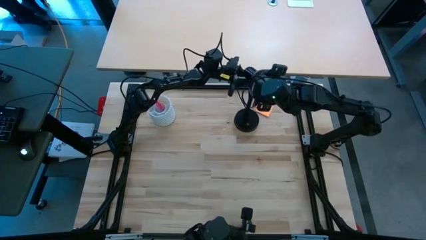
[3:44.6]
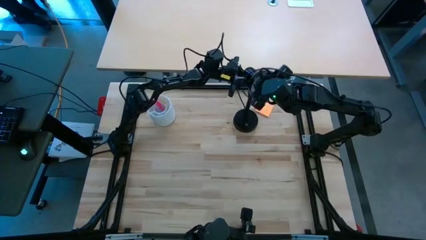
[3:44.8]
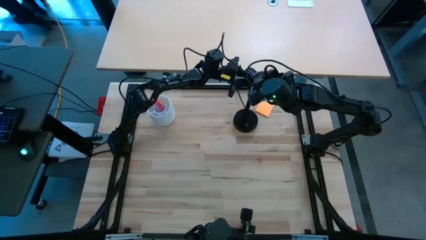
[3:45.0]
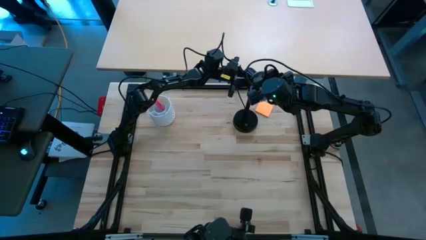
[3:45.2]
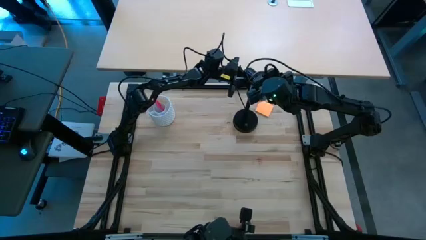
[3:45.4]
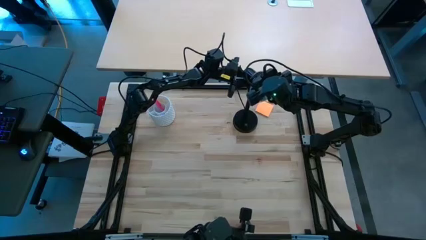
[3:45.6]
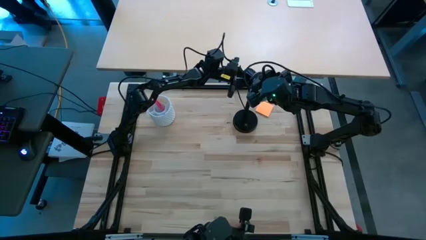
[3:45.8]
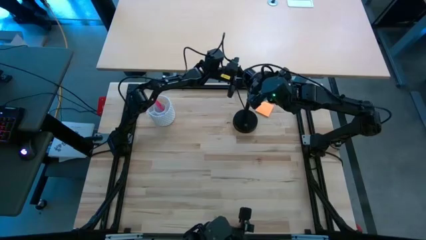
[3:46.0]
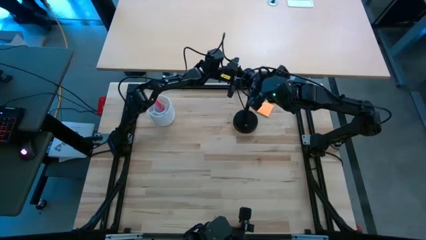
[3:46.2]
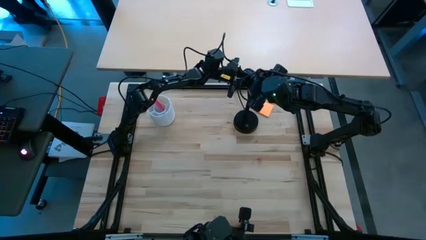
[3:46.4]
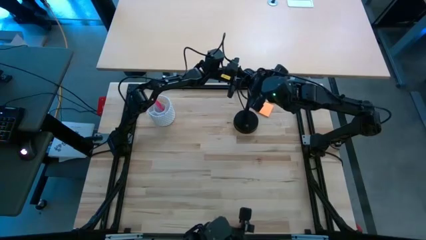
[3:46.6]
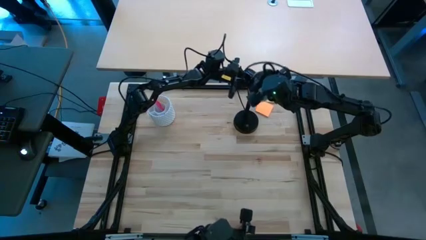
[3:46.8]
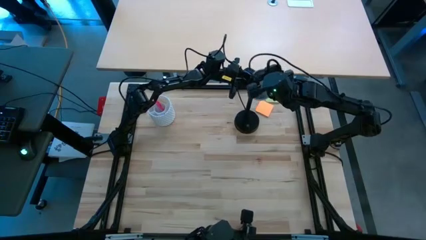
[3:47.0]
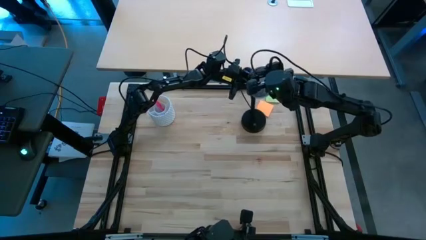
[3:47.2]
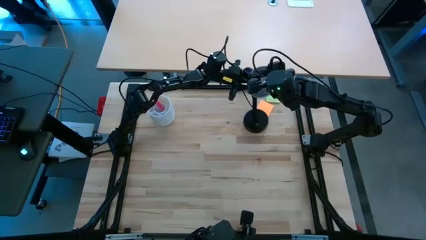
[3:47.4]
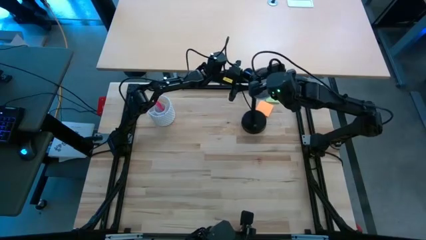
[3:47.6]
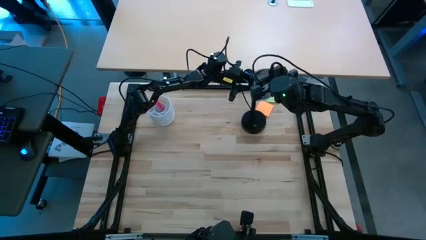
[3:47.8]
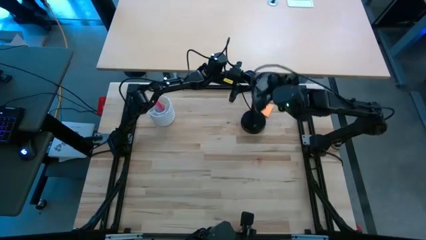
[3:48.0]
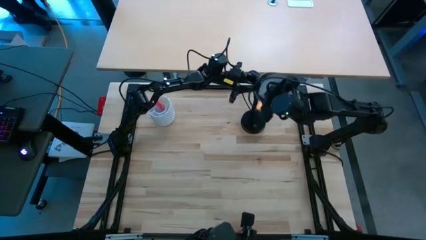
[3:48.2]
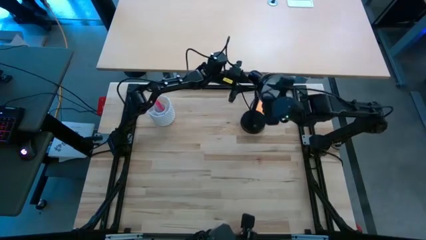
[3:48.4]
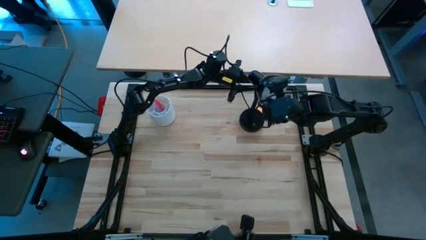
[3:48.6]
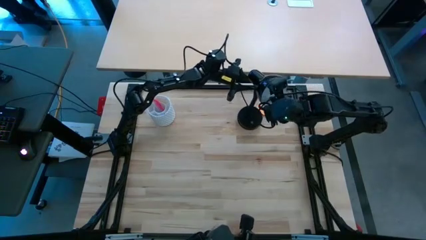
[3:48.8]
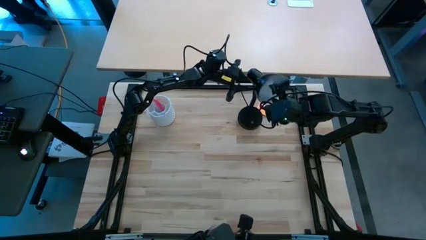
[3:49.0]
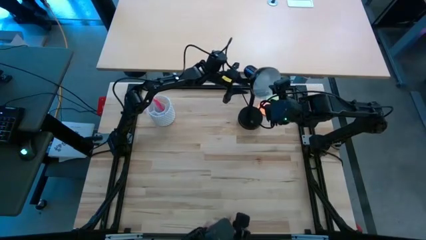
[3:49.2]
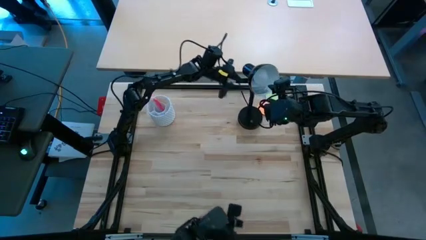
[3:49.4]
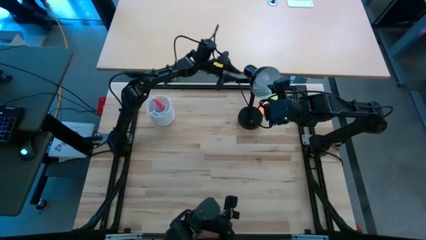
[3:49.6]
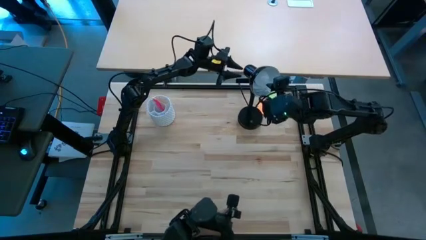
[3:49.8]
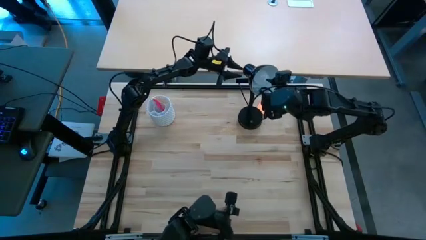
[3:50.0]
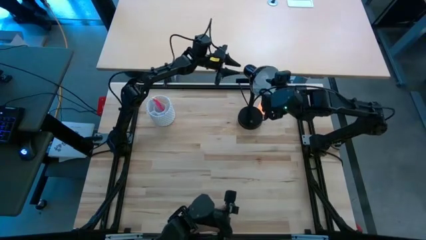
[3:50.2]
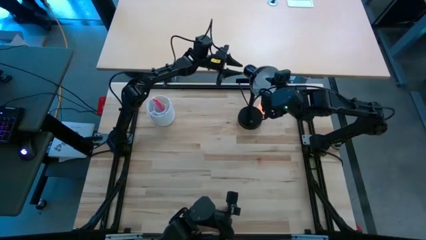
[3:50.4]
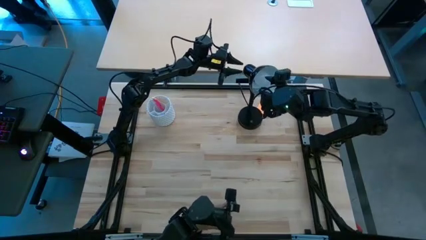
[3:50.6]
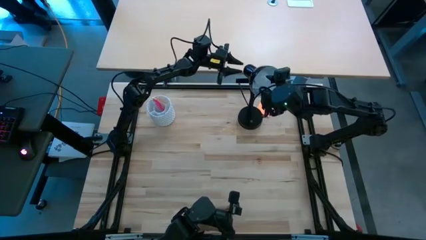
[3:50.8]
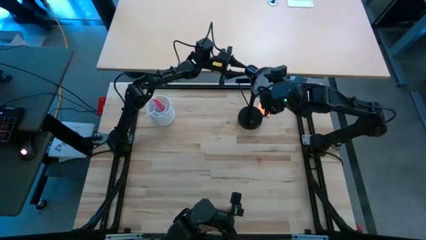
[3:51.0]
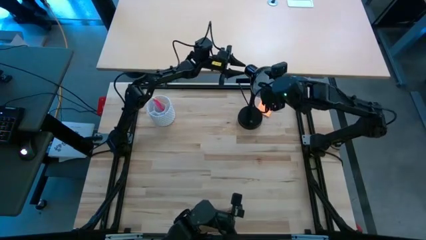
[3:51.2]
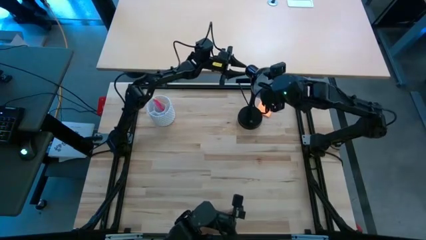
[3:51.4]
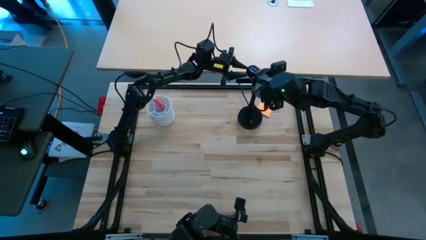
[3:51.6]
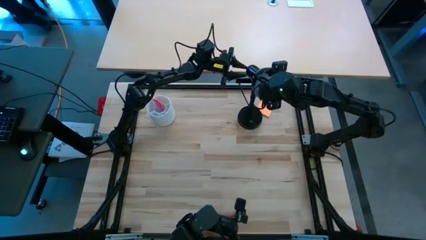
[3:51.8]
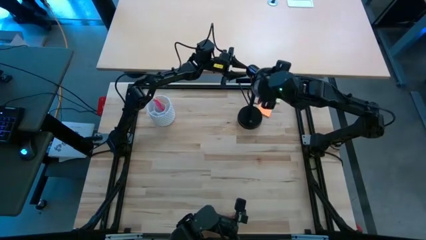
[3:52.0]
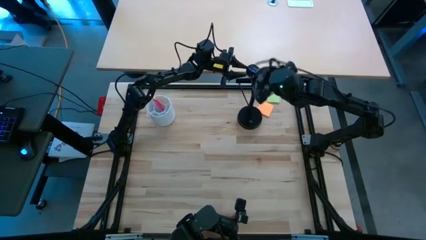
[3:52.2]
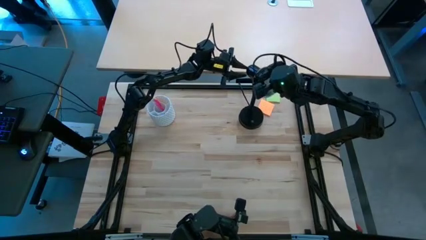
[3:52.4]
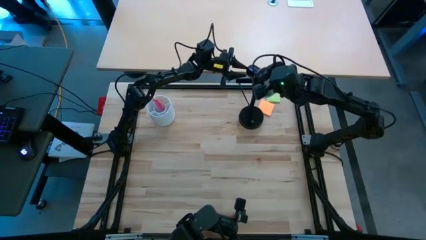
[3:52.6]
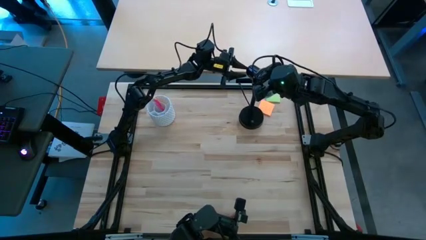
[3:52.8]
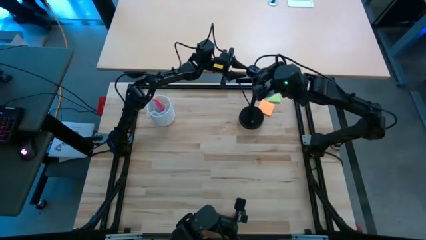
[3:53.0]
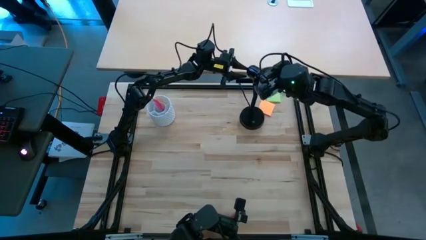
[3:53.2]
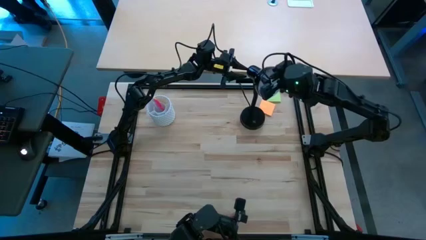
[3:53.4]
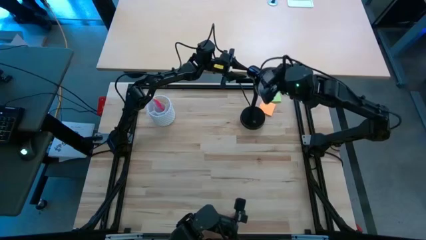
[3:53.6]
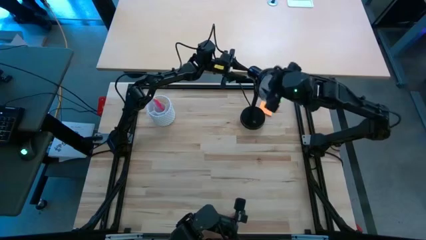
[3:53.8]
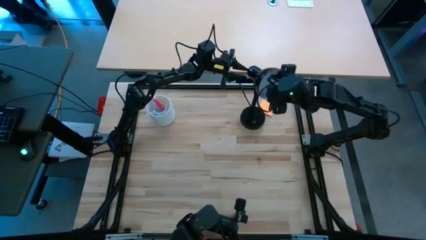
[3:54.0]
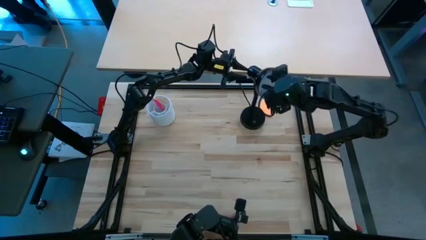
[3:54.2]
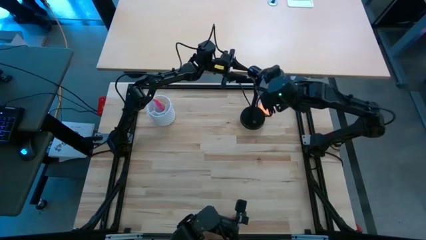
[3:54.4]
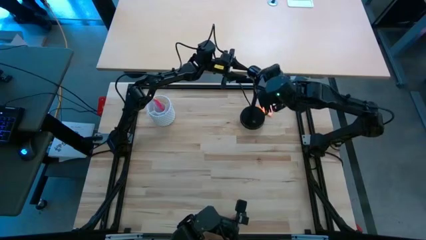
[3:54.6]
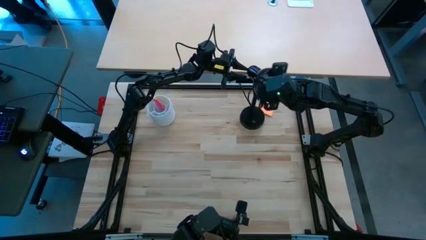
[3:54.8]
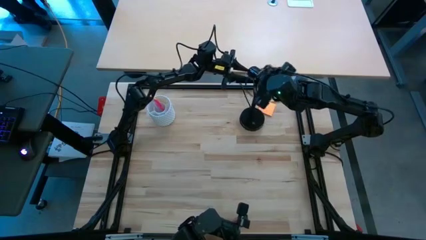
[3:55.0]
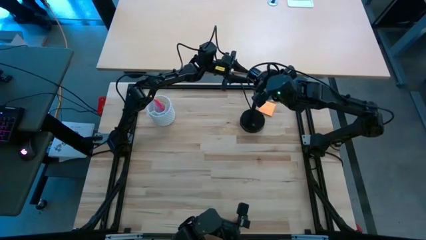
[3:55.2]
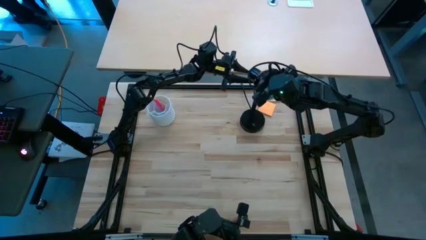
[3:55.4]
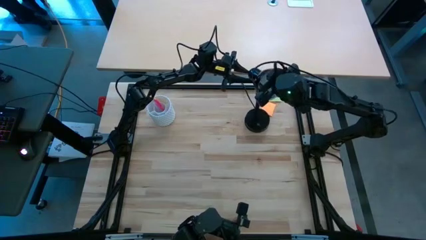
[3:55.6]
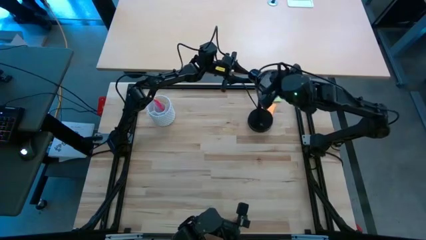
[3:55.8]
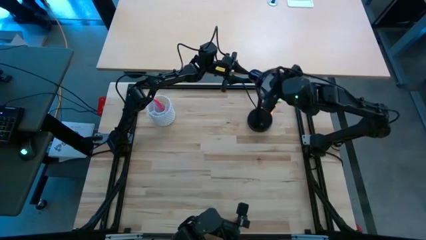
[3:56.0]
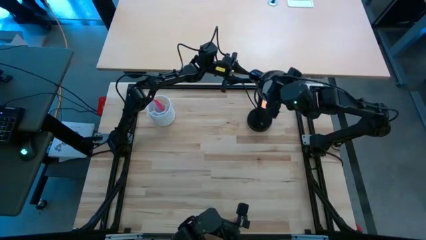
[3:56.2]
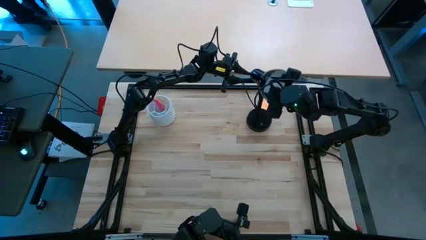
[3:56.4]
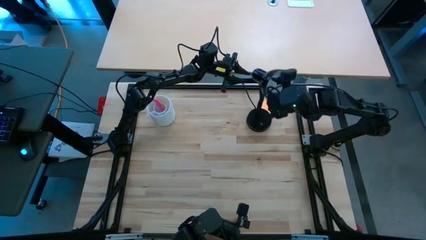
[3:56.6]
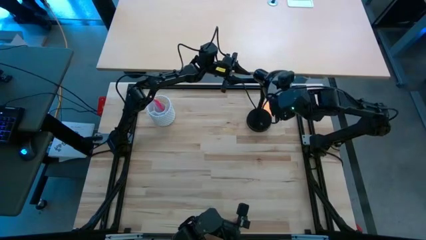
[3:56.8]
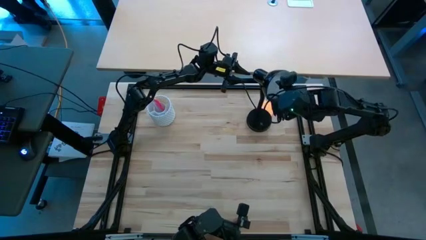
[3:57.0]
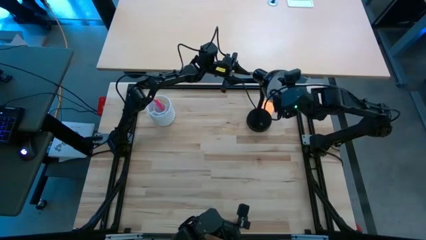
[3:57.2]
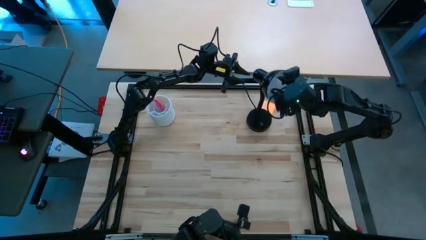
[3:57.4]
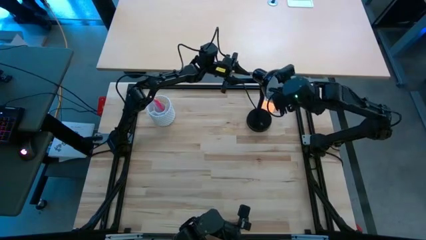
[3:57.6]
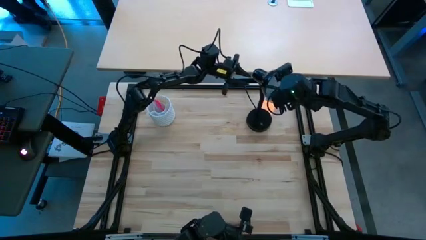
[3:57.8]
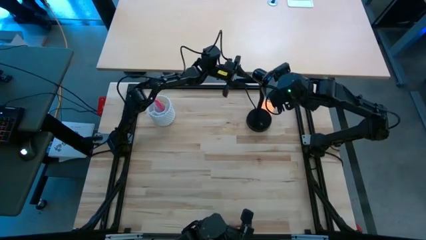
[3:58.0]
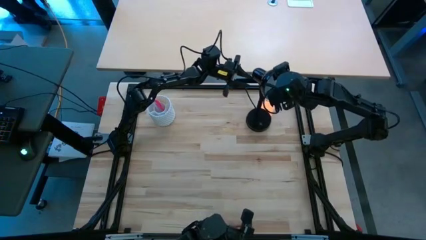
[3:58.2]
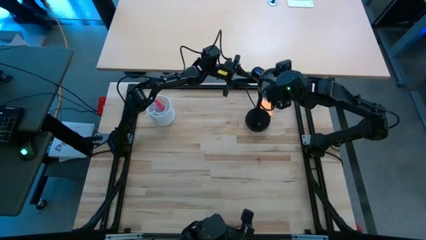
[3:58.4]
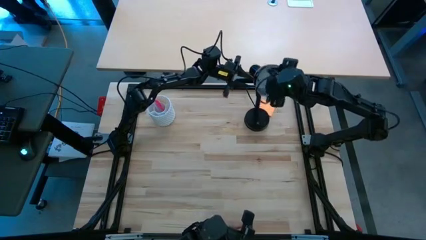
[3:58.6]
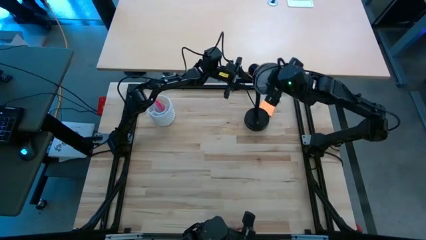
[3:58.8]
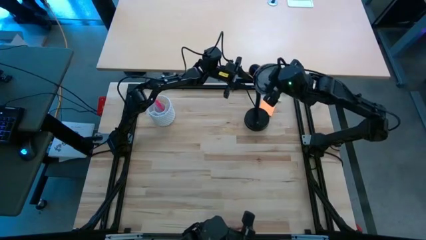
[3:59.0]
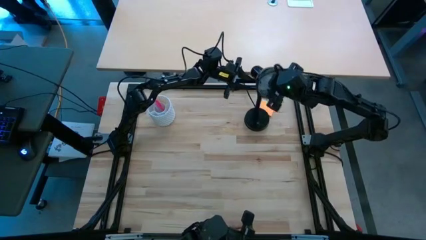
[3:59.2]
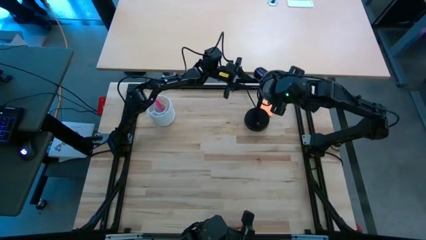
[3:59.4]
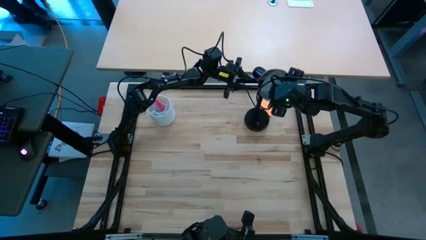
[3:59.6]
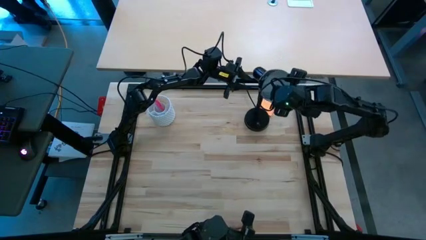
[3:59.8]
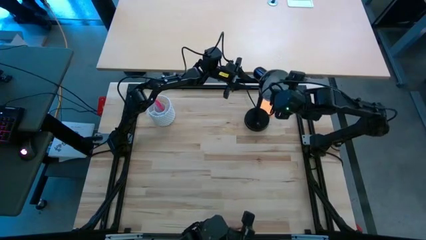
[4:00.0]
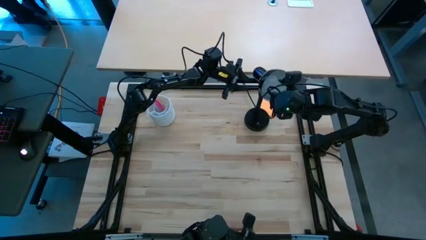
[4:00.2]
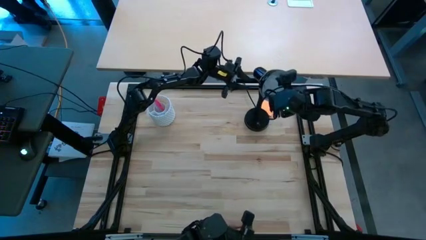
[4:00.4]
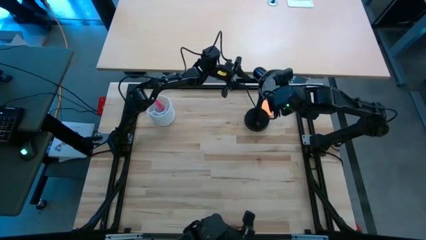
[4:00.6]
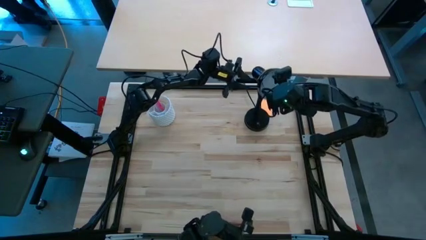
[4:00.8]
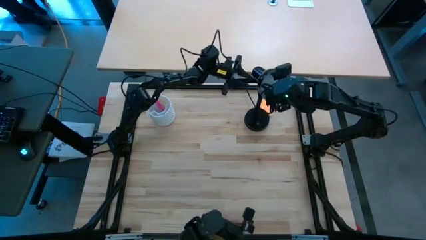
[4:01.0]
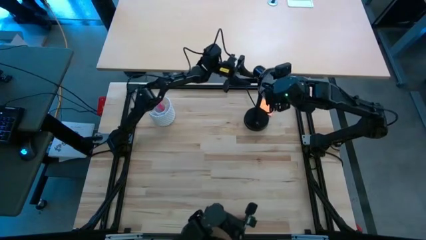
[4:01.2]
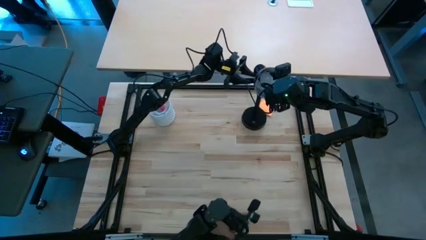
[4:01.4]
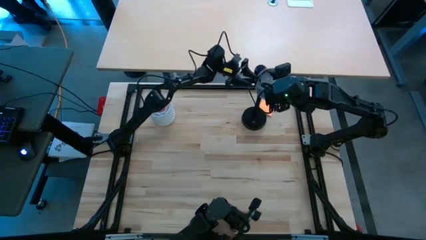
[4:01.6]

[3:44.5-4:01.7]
Task: Screw lightbulb
Insert the light bulb into the desk lamp
